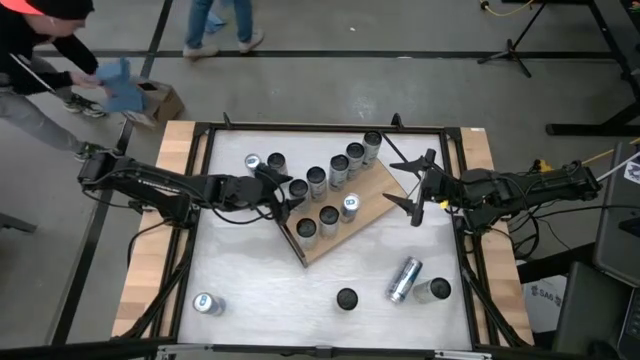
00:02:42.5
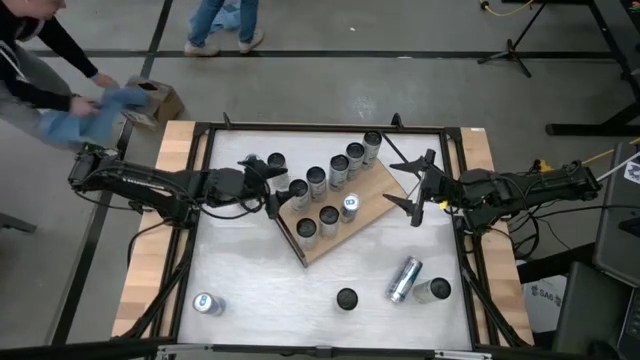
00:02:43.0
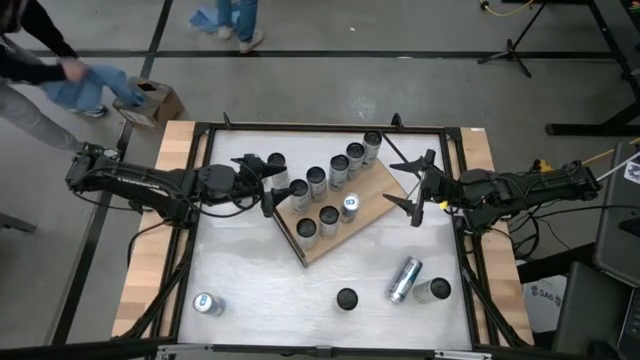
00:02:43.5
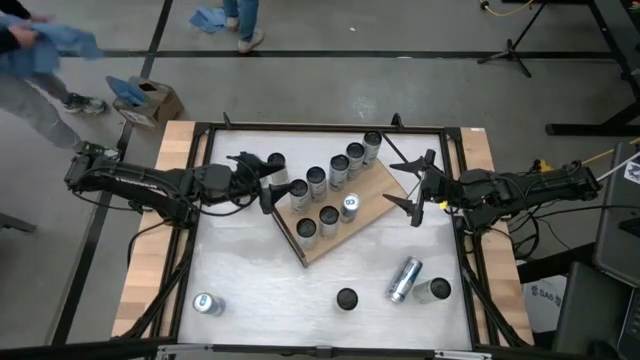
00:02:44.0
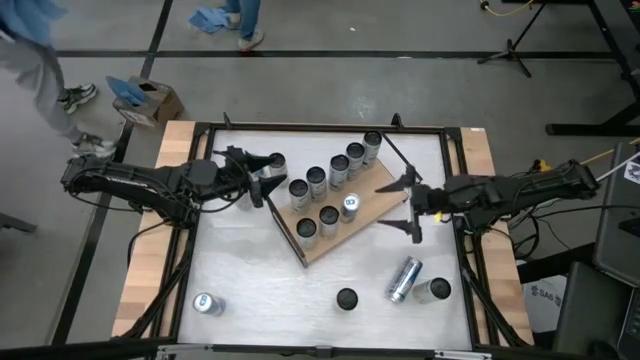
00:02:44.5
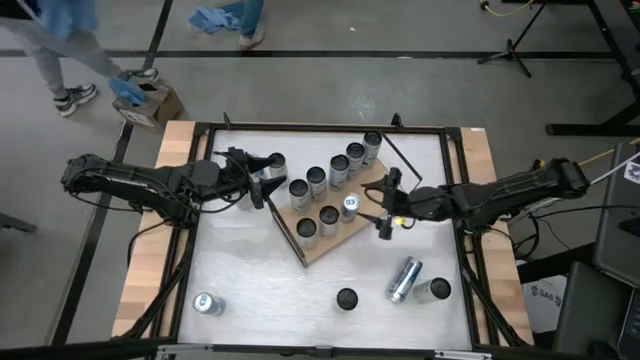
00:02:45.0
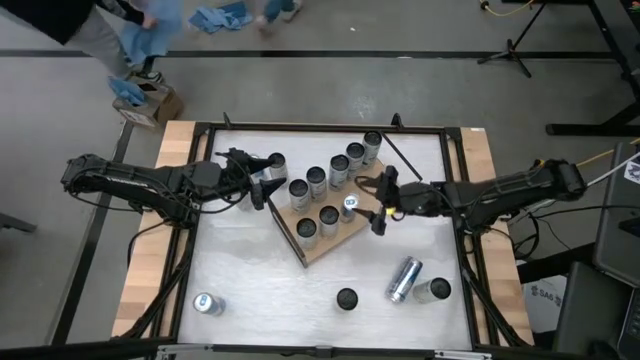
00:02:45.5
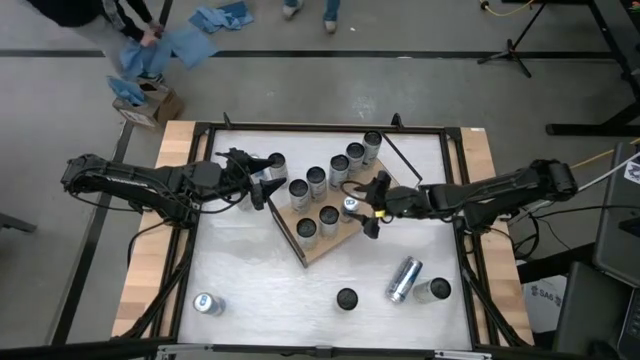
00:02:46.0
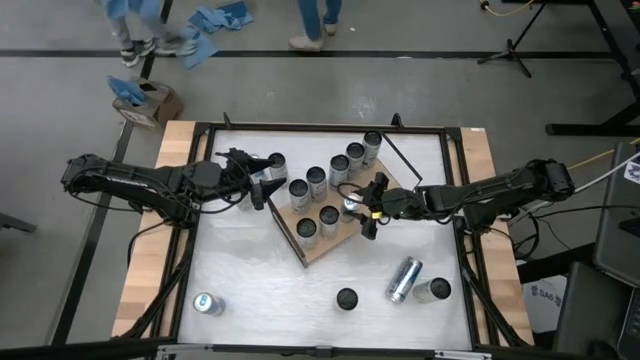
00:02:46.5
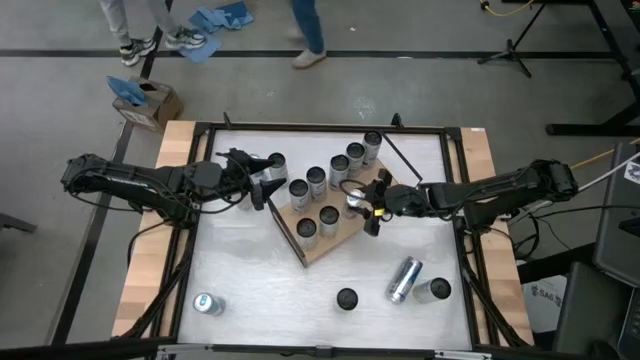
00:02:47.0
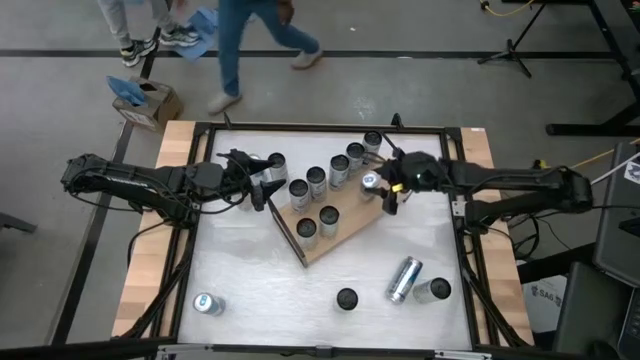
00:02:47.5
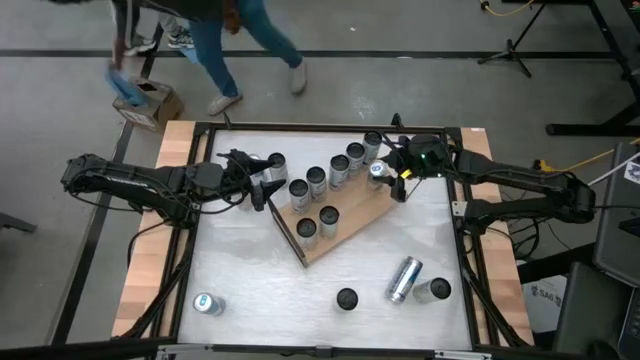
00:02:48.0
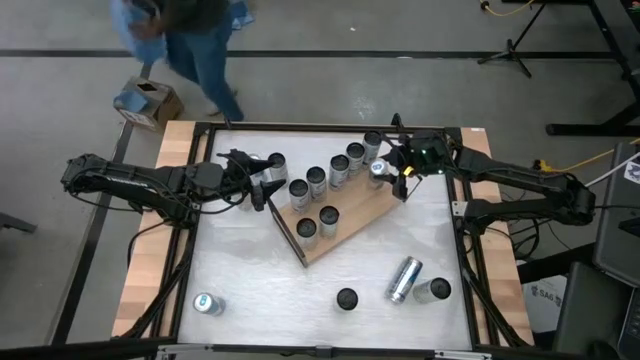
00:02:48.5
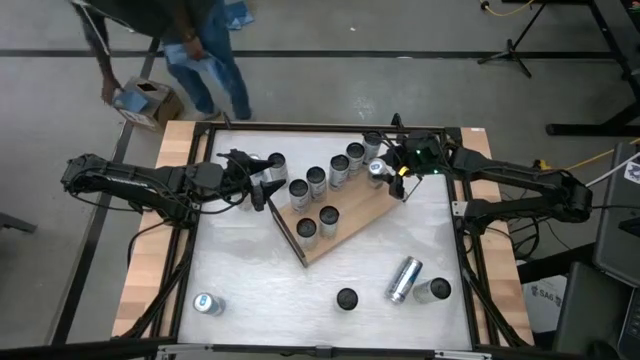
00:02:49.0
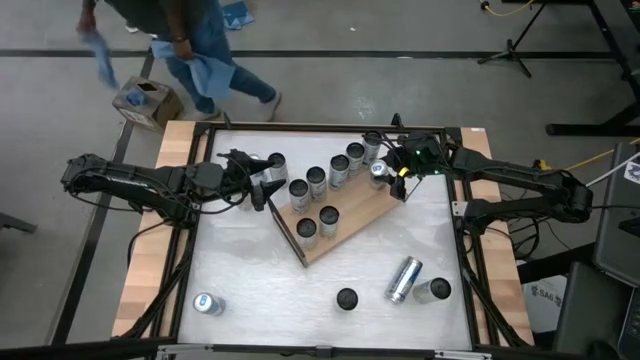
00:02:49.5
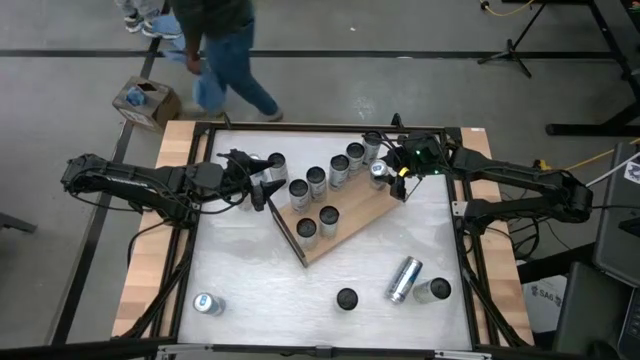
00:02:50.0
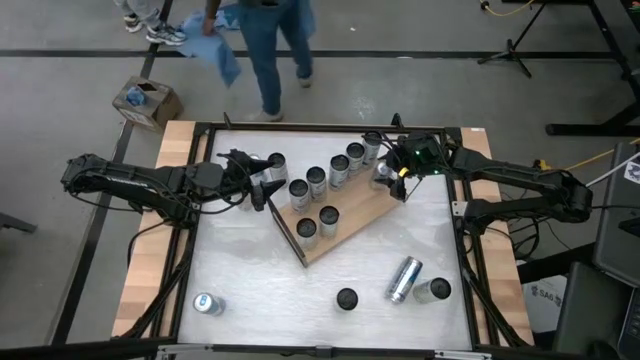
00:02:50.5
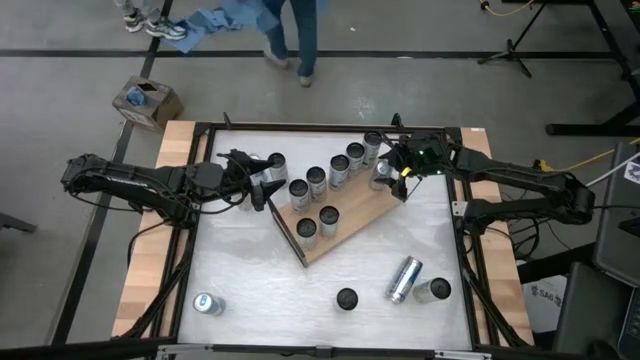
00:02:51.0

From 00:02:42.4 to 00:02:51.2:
Task: Place canned beverage on shelf
Adjust the blue soda can on the shelf

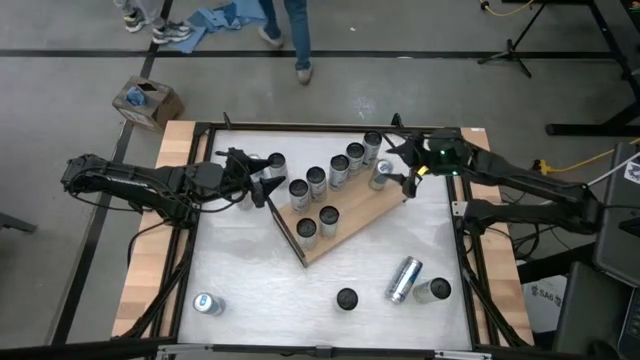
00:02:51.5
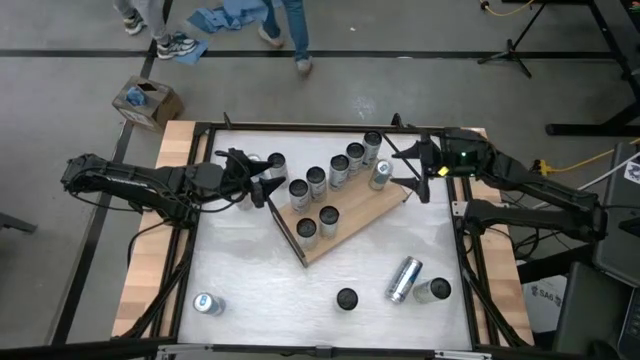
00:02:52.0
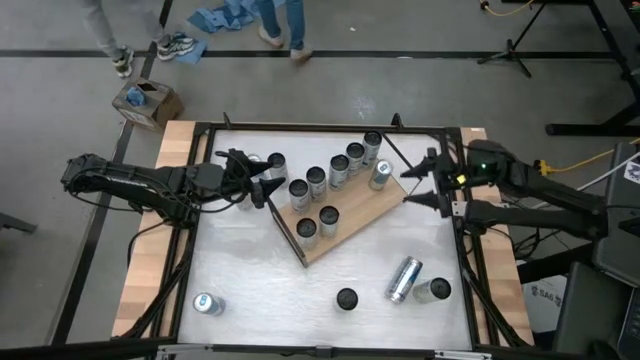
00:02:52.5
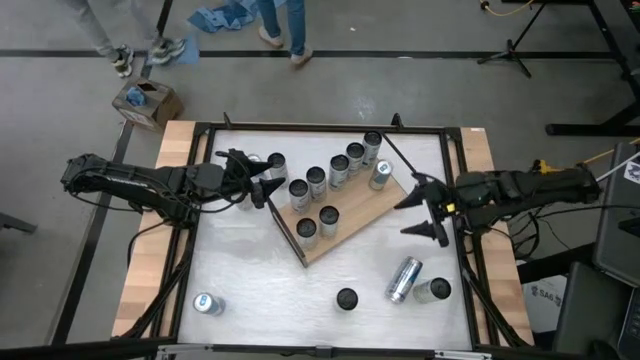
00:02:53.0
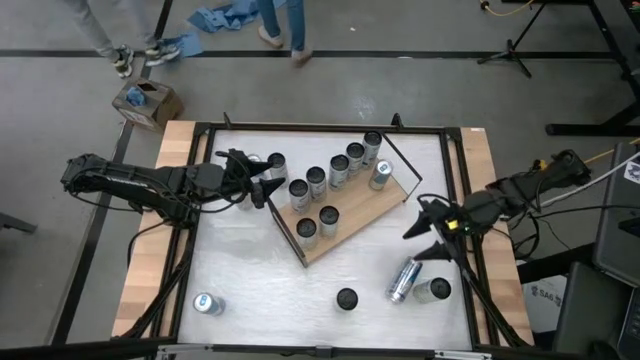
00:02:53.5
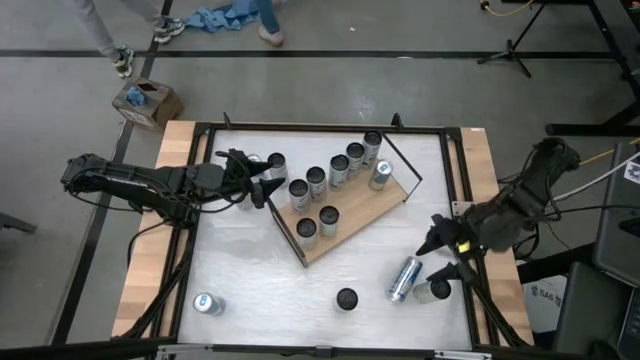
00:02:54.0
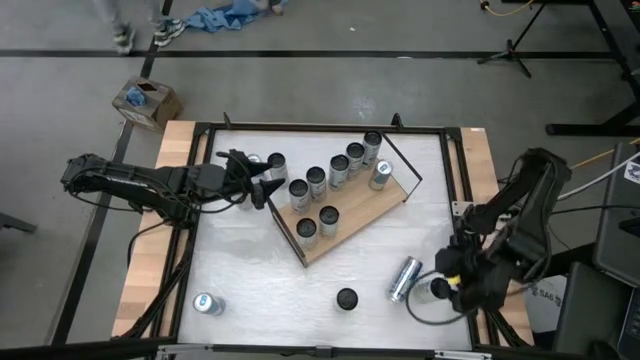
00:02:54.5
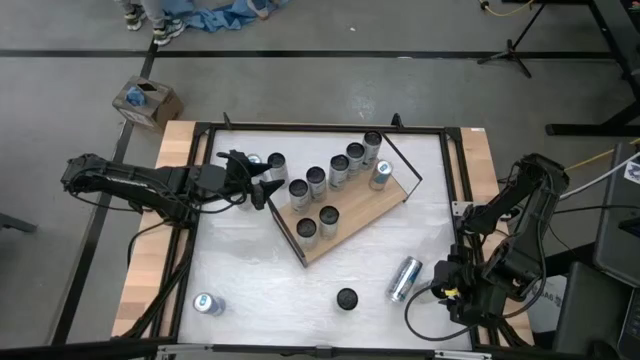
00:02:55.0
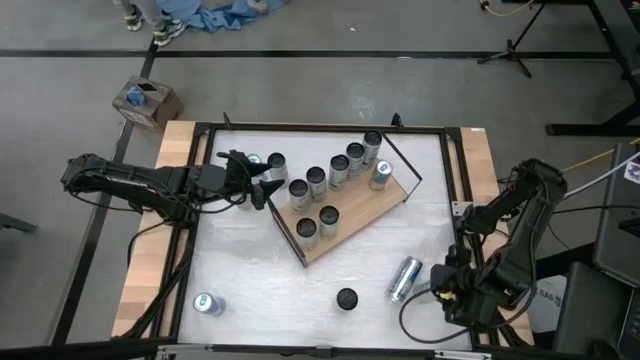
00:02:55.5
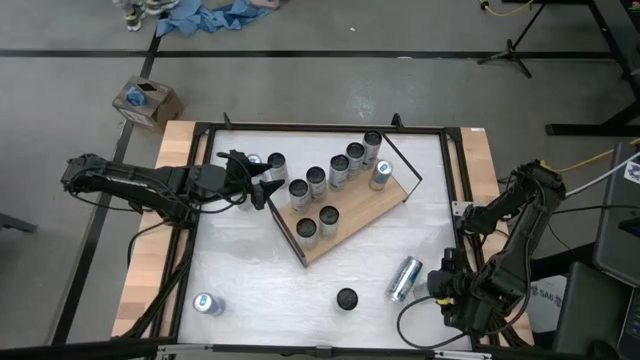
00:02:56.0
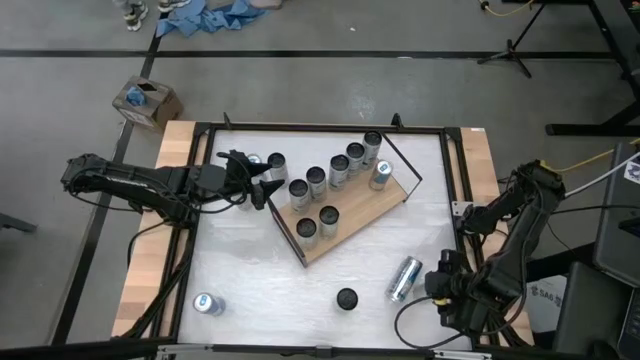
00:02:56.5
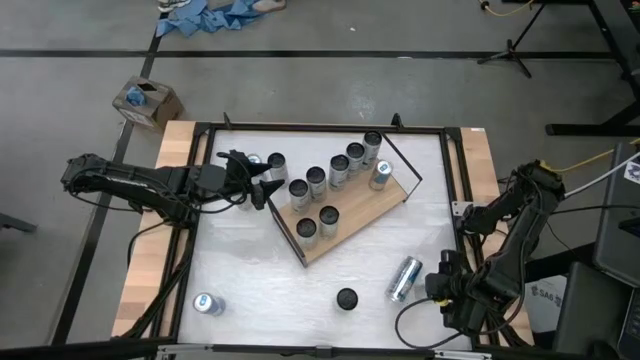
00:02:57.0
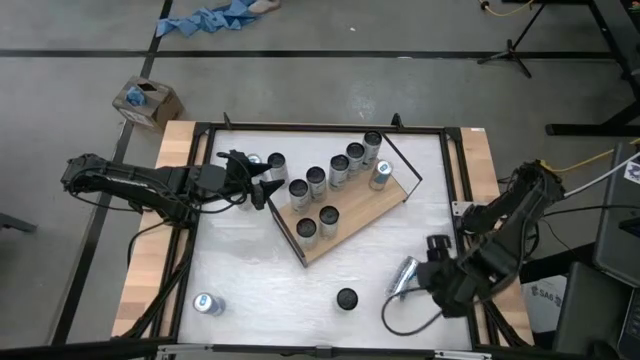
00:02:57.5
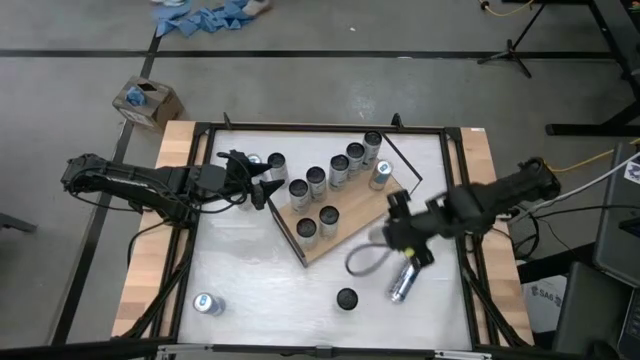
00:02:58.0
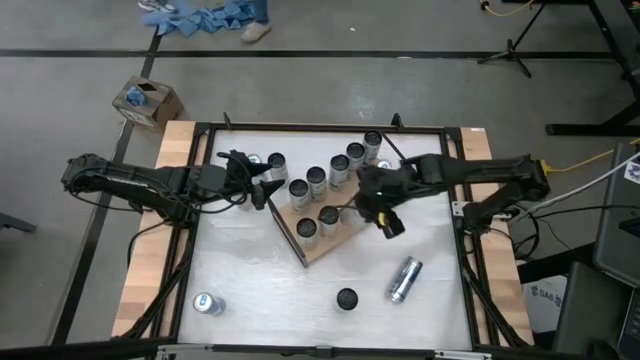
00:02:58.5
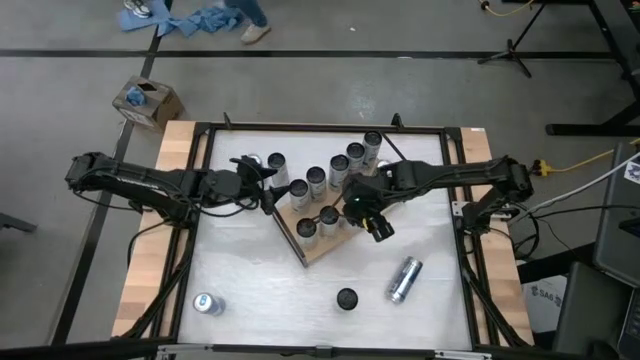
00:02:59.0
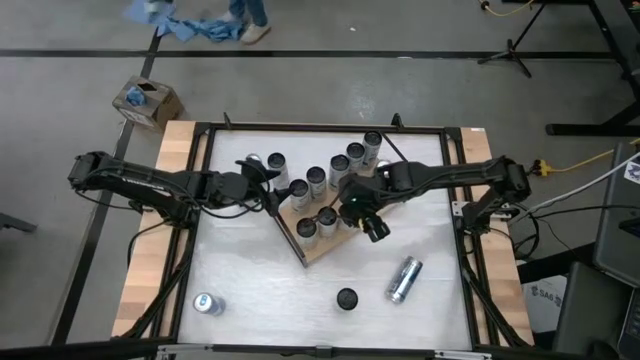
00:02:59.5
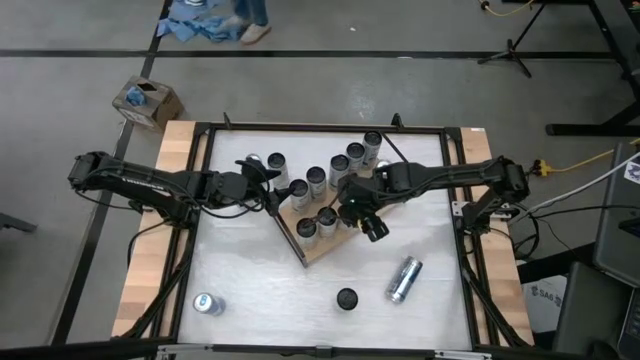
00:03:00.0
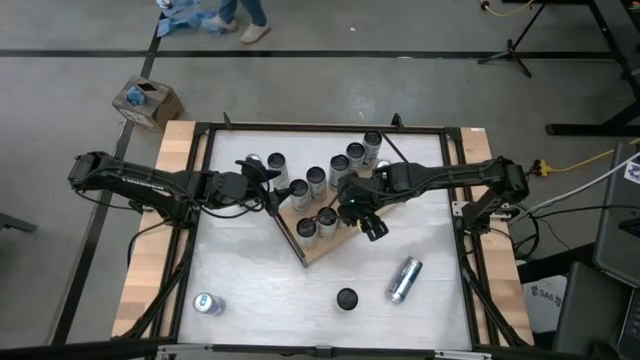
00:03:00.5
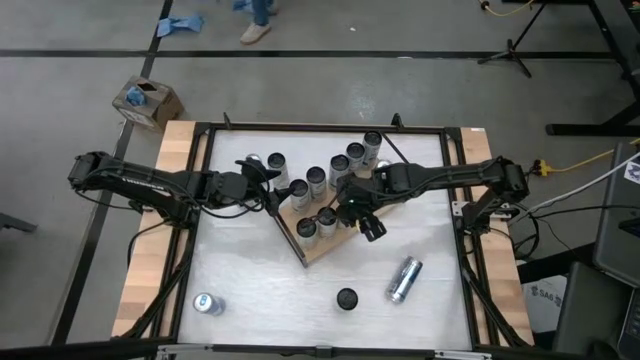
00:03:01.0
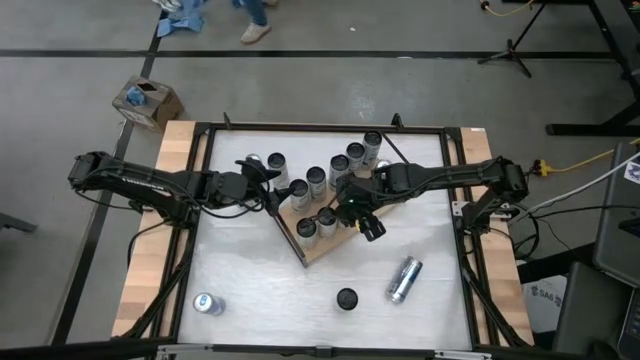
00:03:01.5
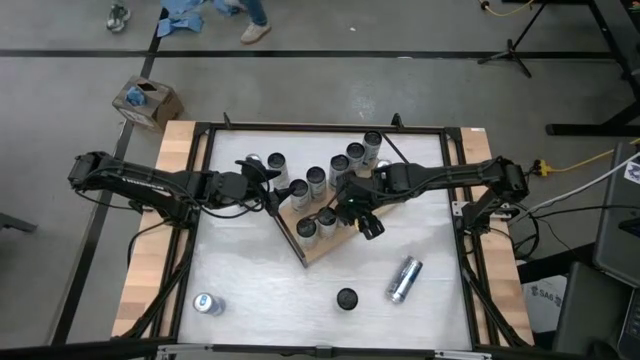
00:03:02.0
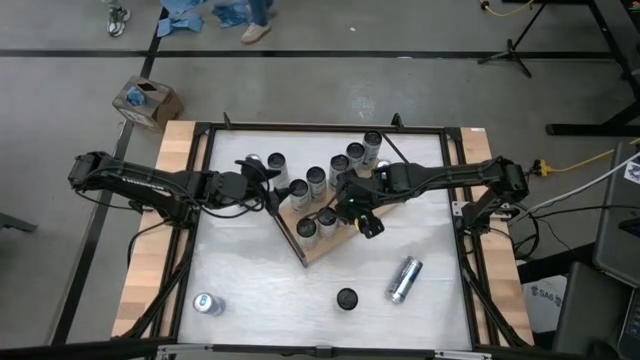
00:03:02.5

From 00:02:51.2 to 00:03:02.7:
Put the white yellow soda can on the shelf

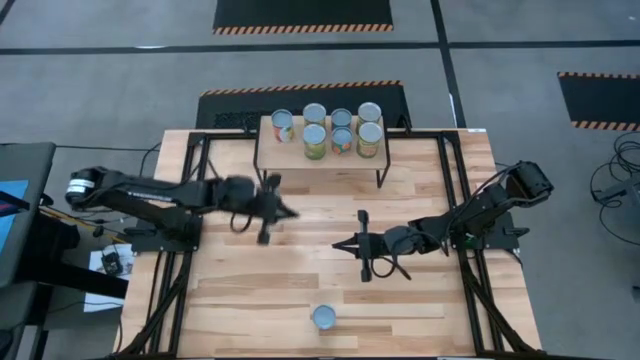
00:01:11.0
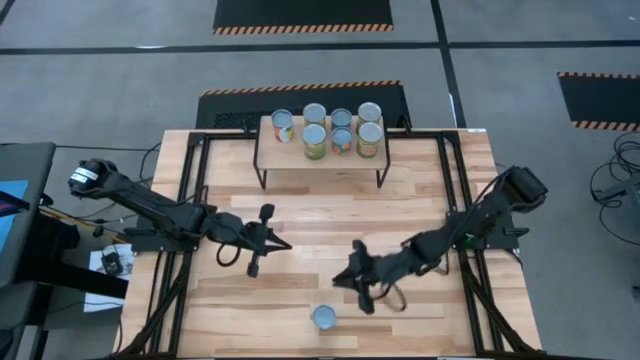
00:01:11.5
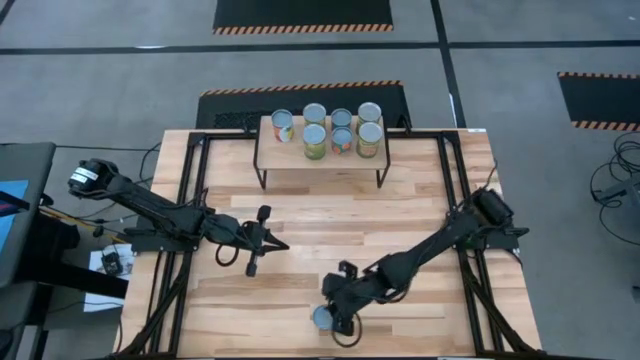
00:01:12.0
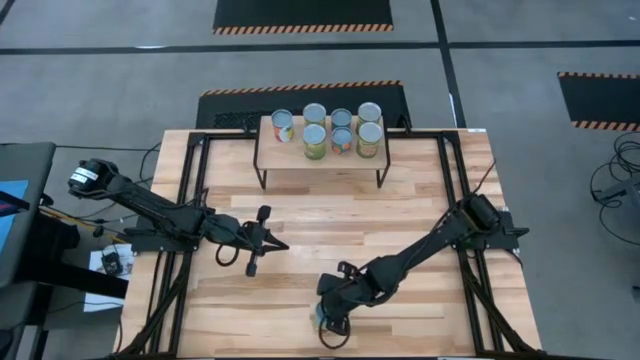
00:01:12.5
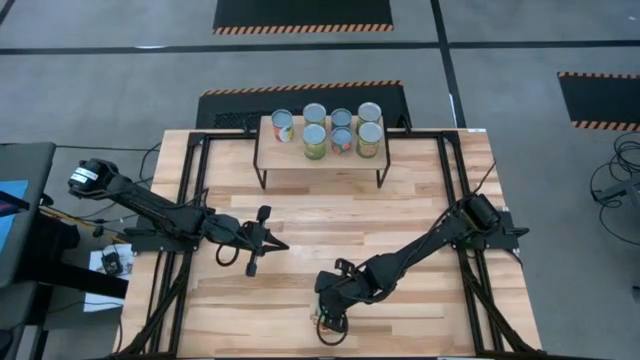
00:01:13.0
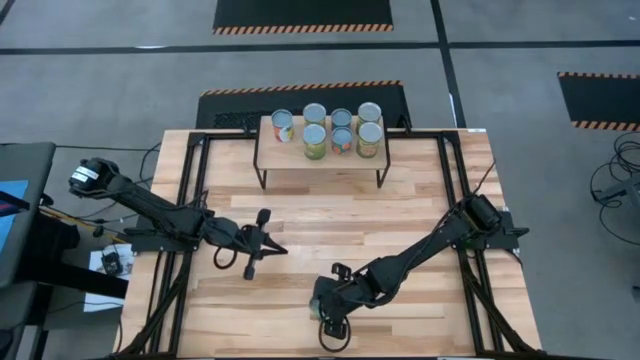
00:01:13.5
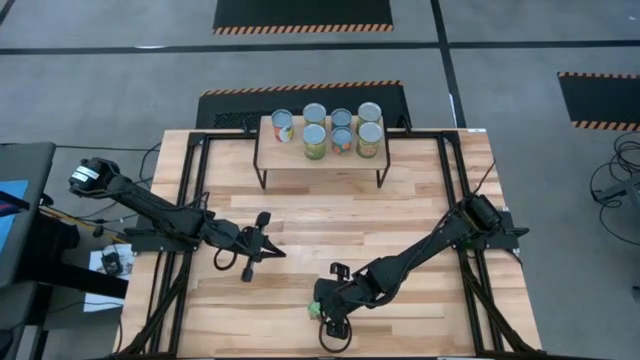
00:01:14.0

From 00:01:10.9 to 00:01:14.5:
Task: Pick and place cans onto a shelf
Put the red small can on the shelf
